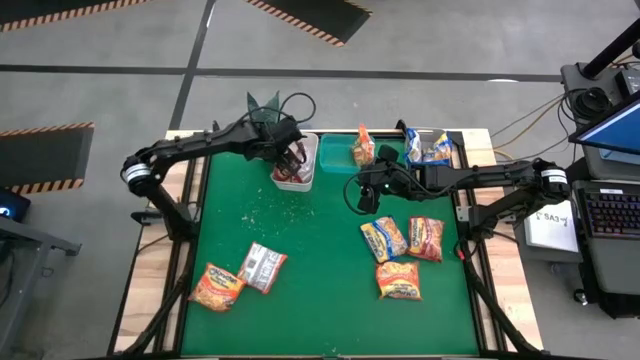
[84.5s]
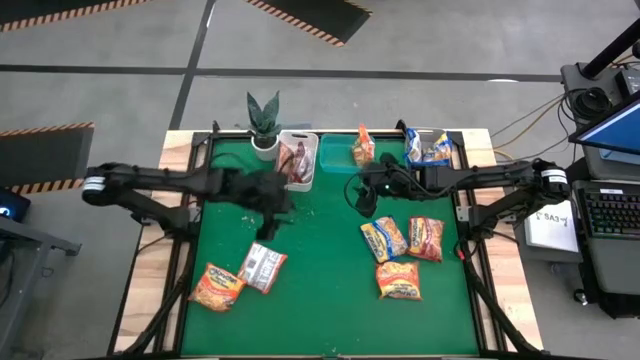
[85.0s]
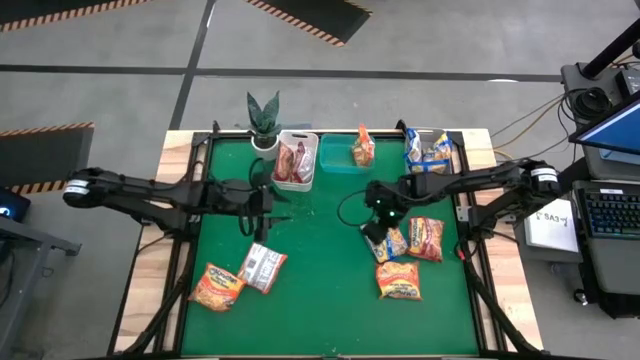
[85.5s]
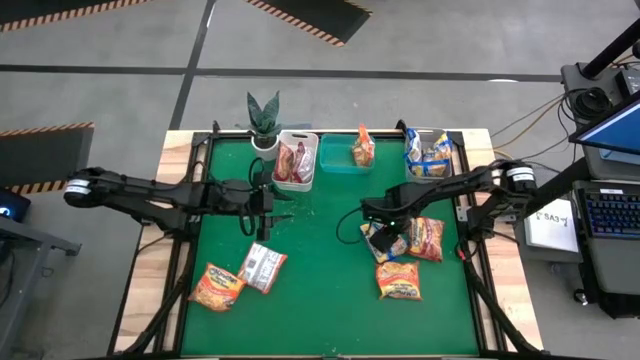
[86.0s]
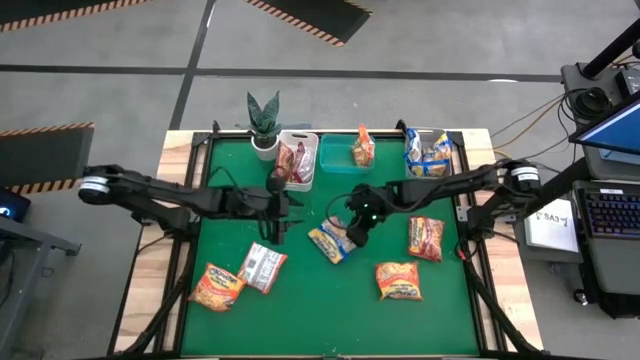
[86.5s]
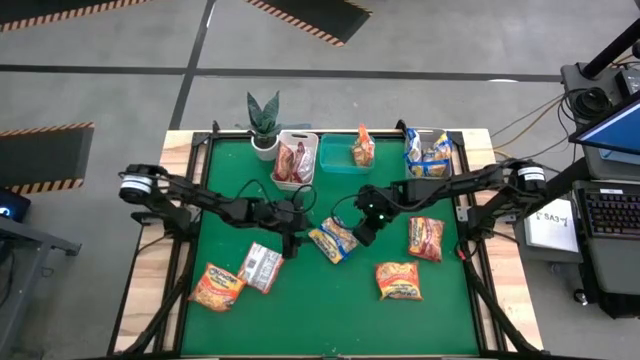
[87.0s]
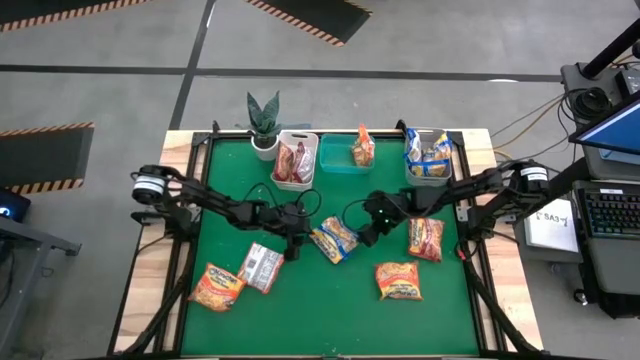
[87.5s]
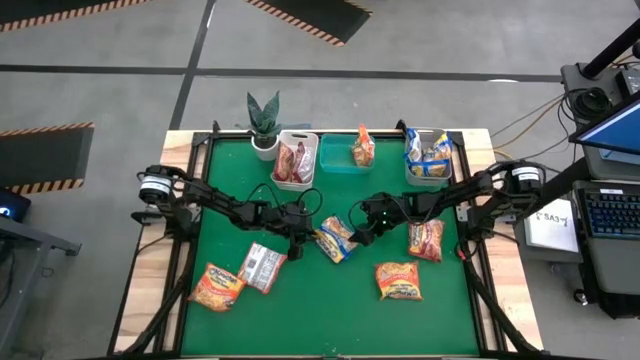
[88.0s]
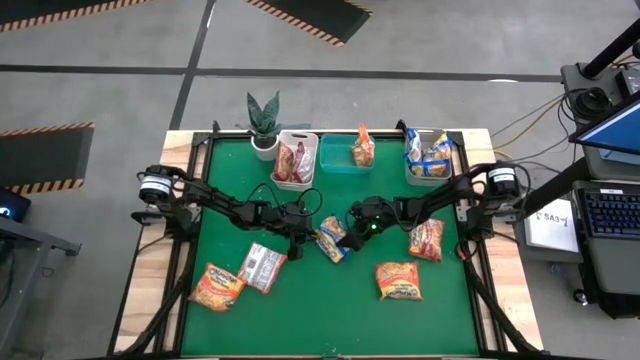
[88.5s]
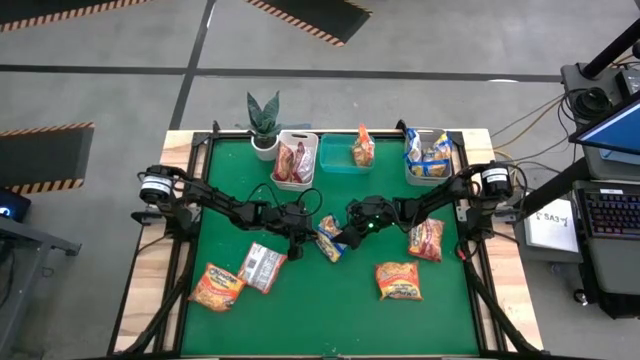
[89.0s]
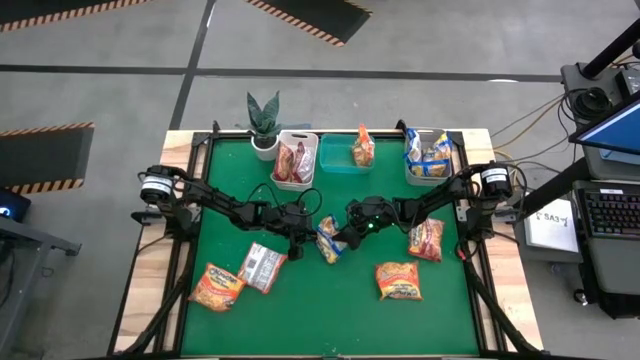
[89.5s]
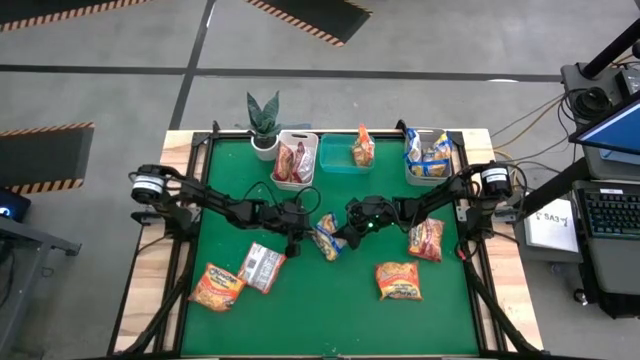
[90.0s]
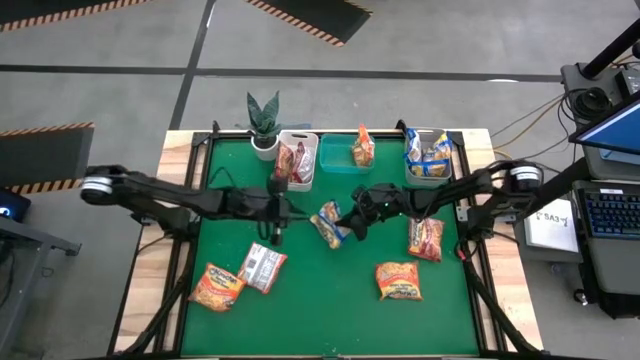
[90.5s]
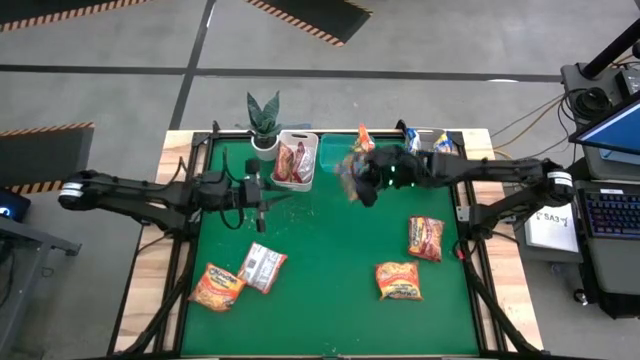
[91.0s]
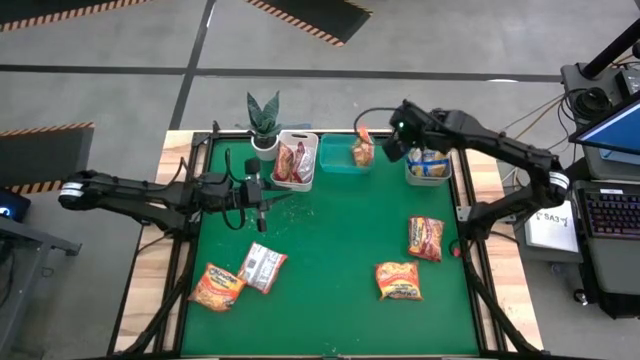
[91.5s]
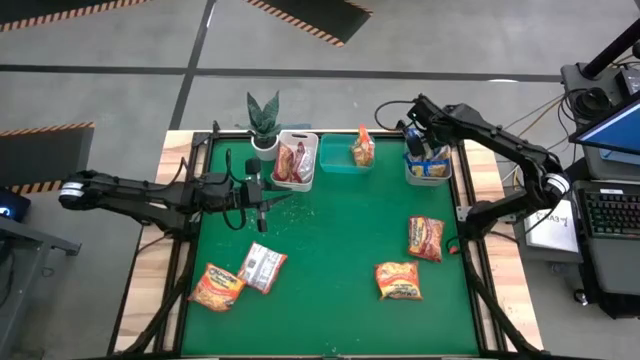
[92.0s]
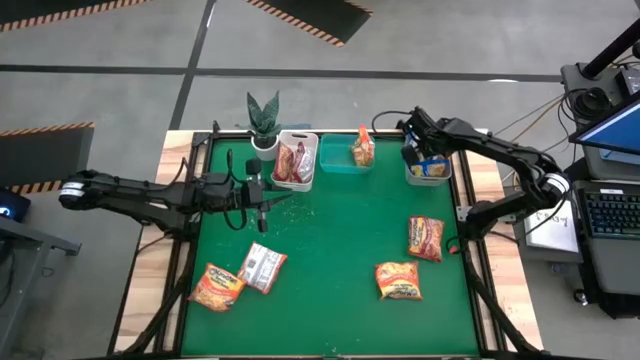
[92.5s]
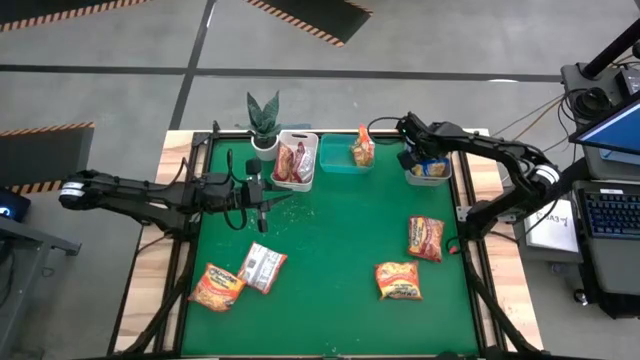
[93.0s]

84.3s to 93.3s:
Task: Sort Maruchan noodles
Put the blue noodle pack into the gray bin

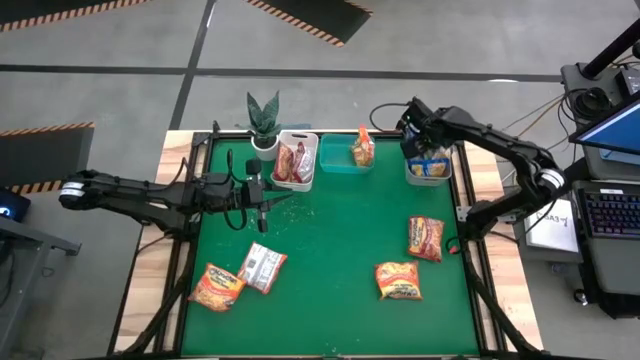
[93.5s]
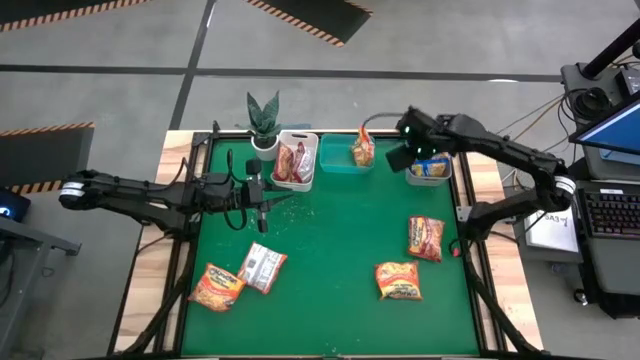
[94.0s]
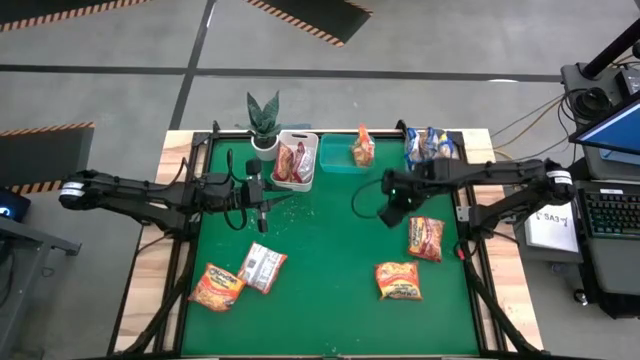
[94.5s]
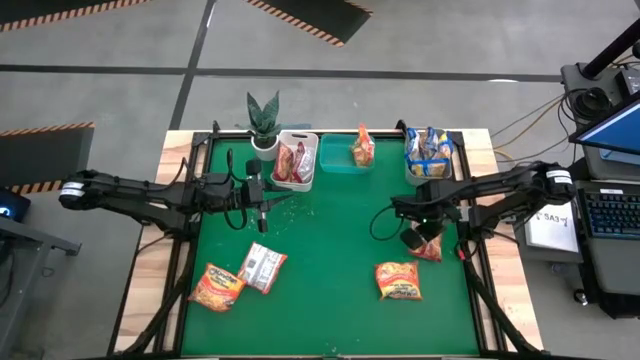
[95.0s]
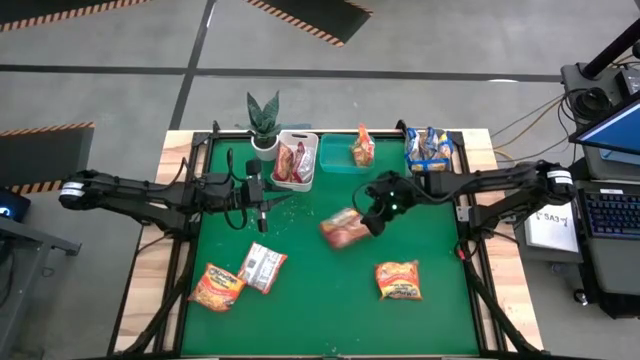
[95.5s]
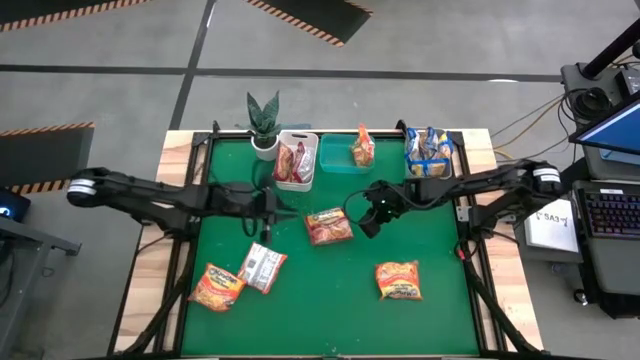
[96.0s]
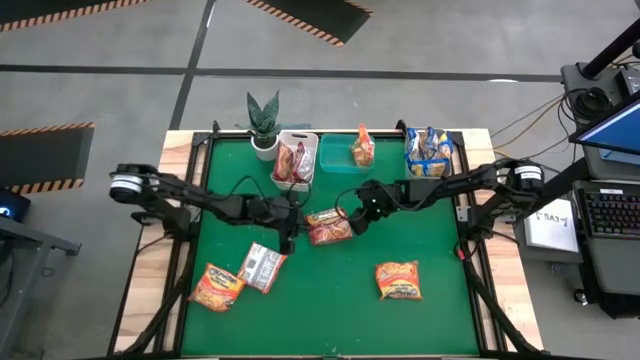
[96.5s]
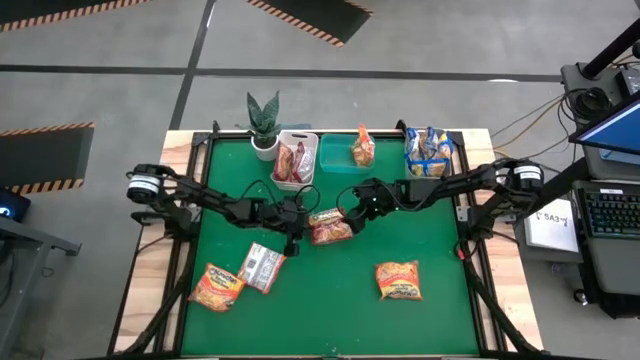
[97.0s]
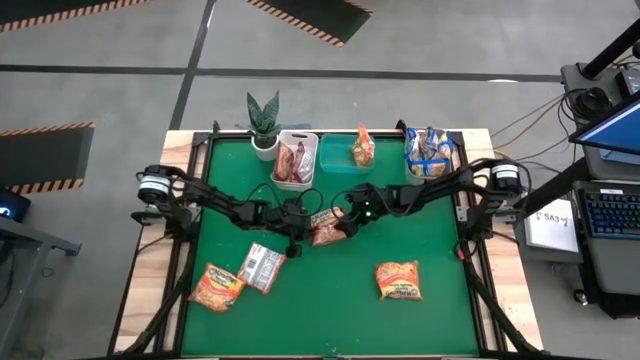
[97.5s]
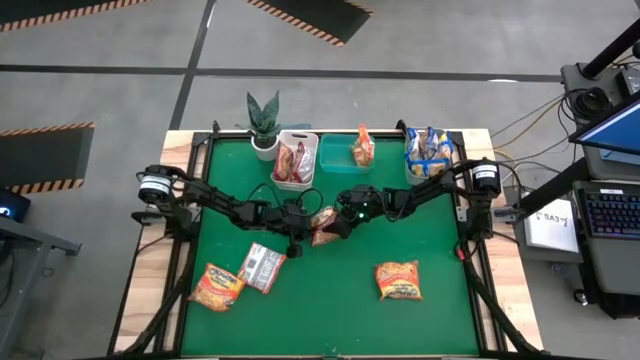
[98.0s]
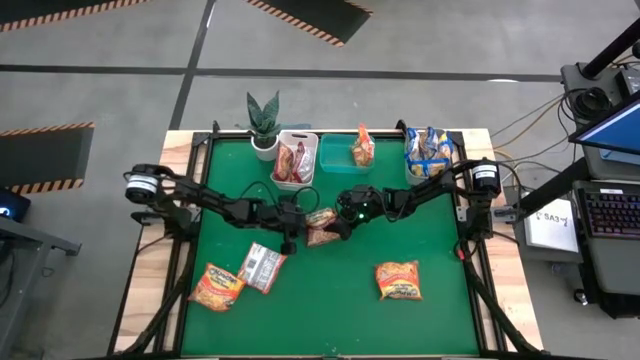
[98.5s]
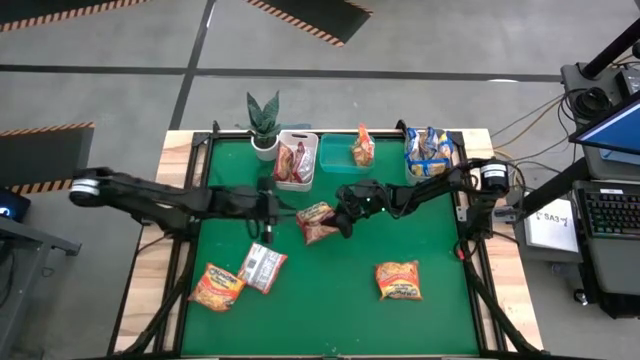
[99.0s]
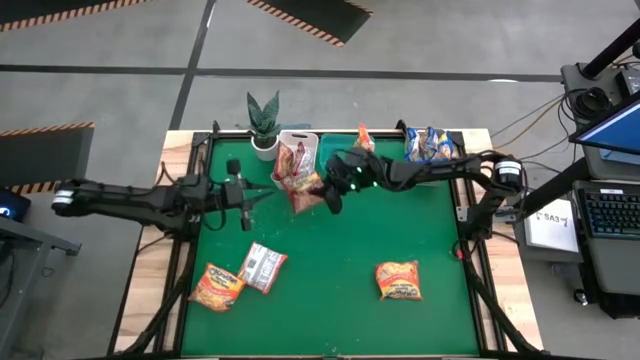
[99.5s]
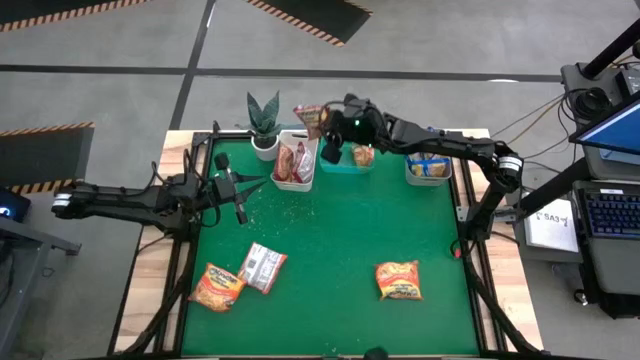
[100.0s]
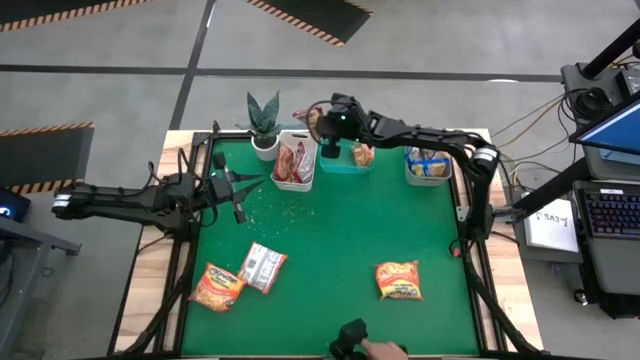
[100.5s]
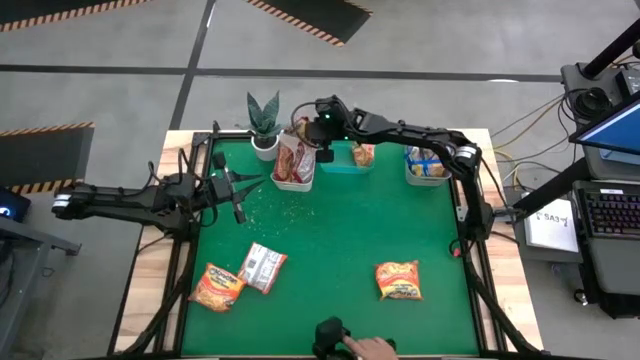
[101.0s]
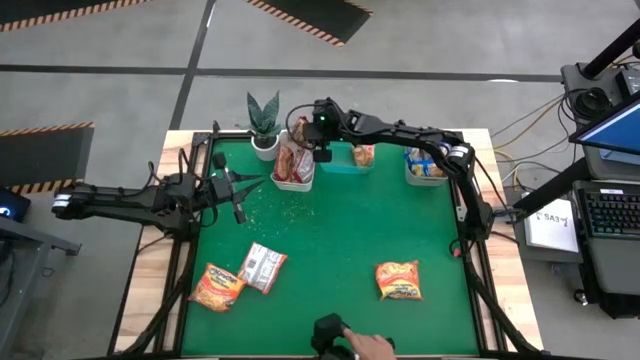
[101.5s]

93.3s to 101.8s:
Put the red noodle pack into the white bin

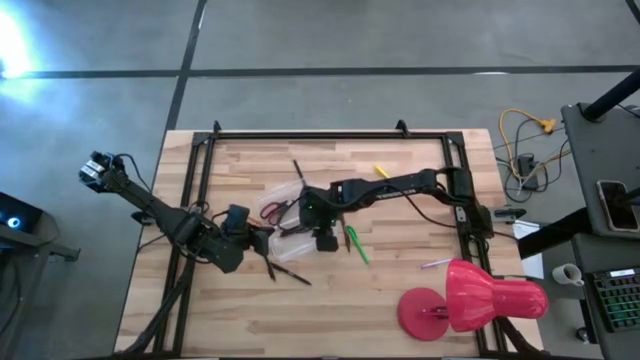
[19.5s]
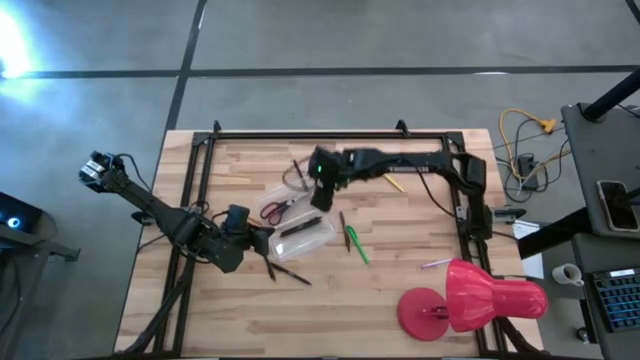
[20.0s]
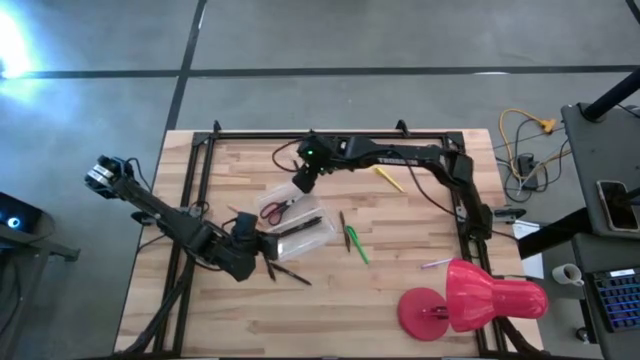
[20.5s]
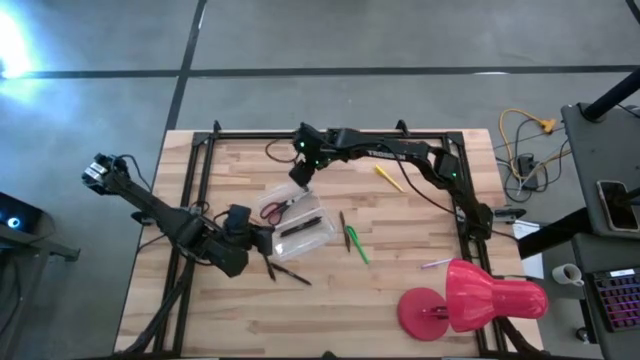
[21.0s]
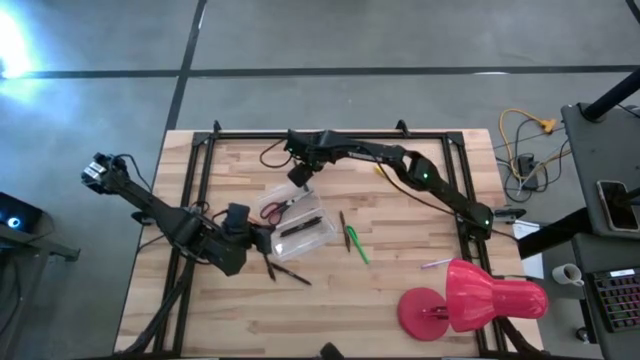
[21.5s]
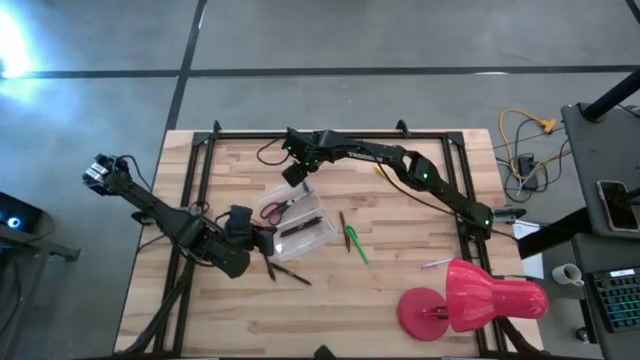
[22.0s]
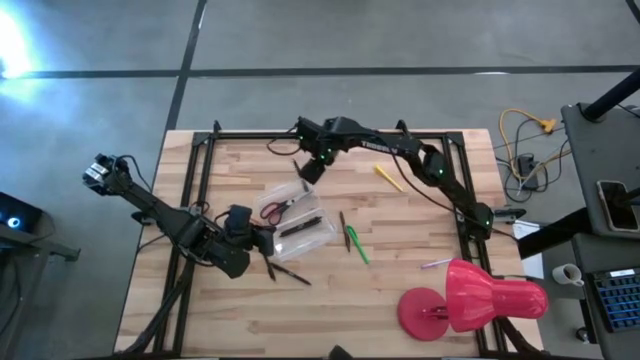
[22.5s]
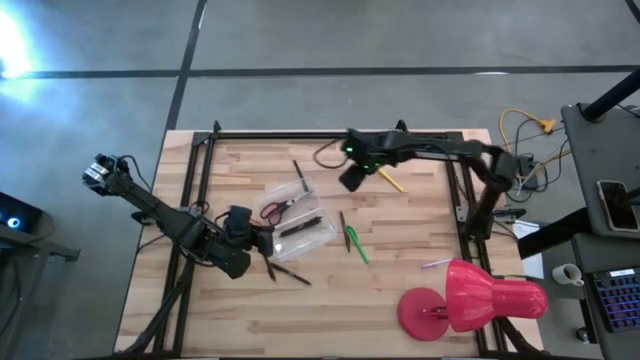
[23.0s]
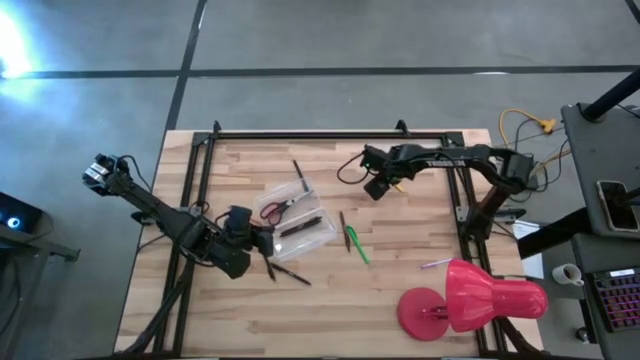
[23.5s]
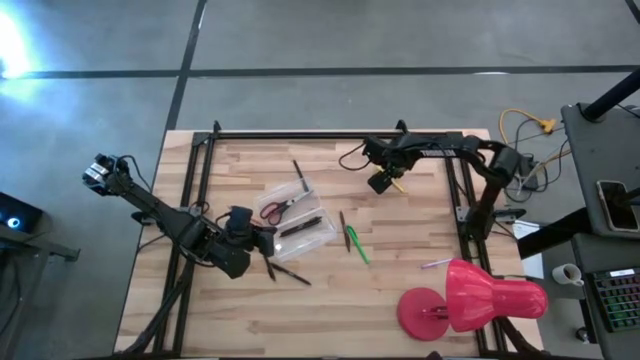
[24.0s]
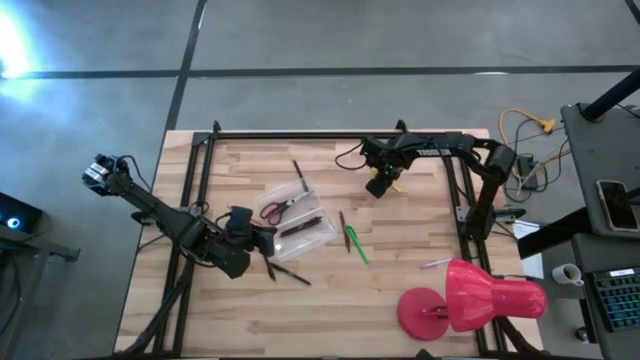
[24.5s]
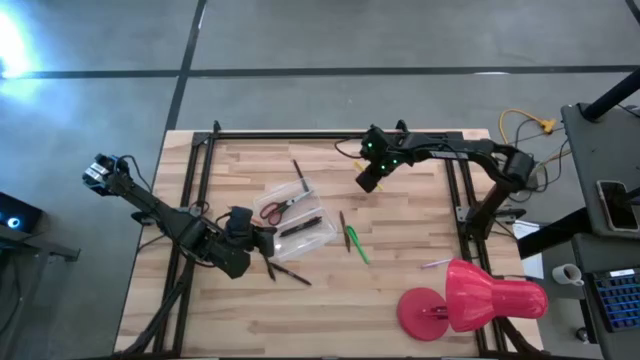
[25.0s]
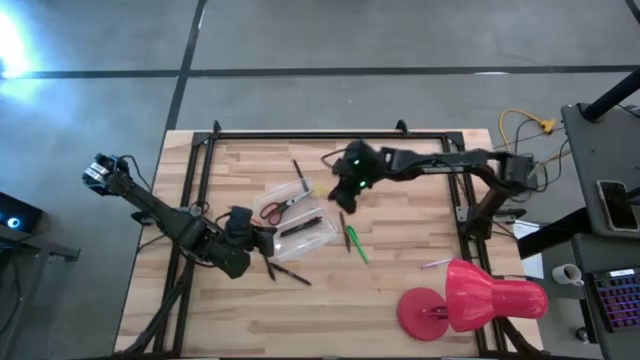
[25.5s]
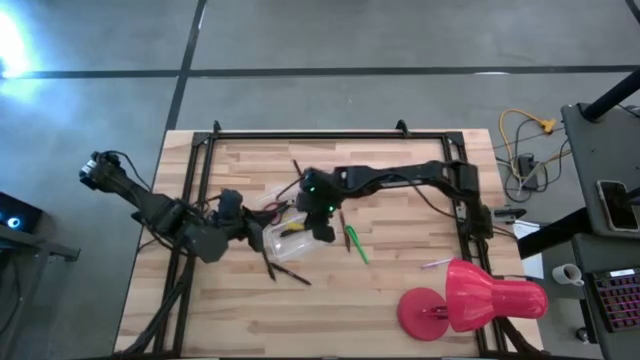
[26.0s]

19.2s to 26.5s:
Task: Pick & place school supplies into a supply box
Put the yellow pen into the stationery box
